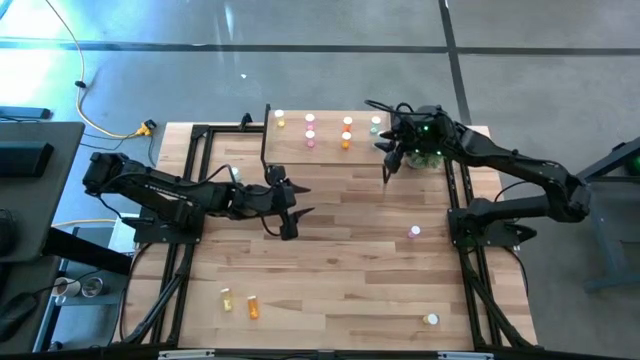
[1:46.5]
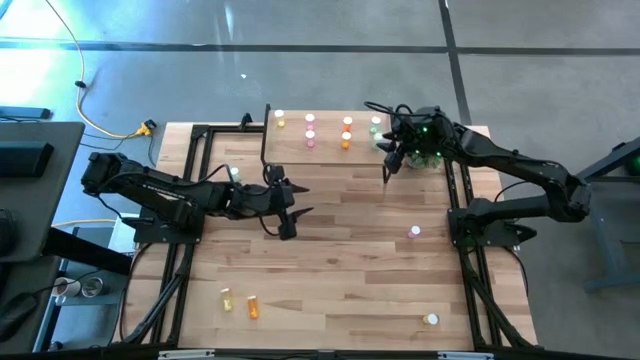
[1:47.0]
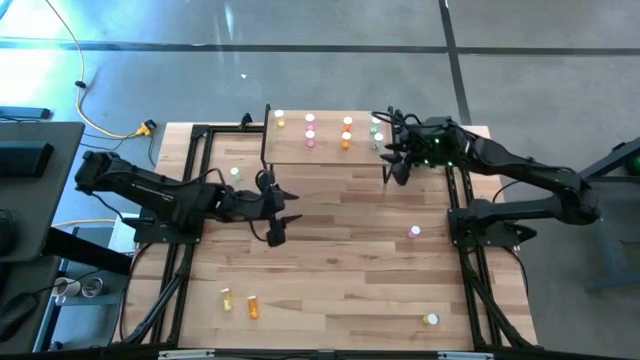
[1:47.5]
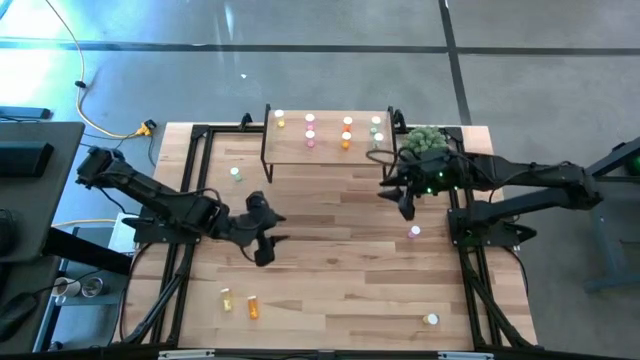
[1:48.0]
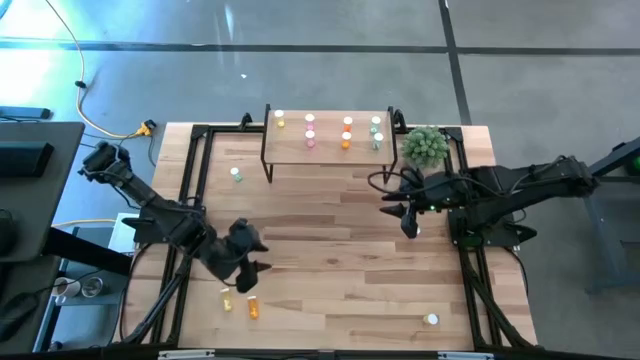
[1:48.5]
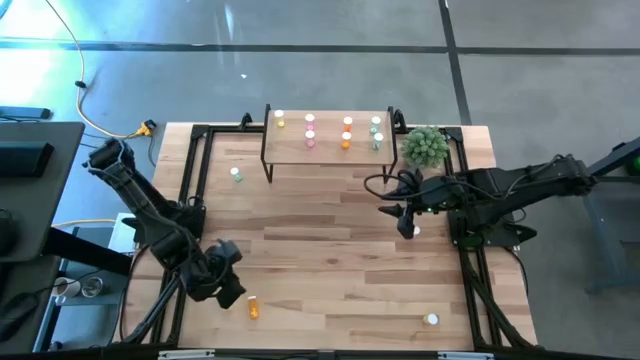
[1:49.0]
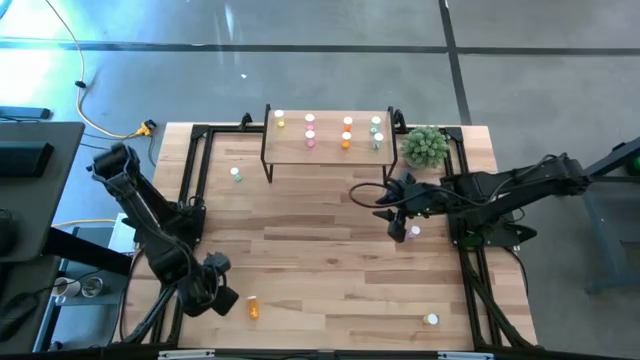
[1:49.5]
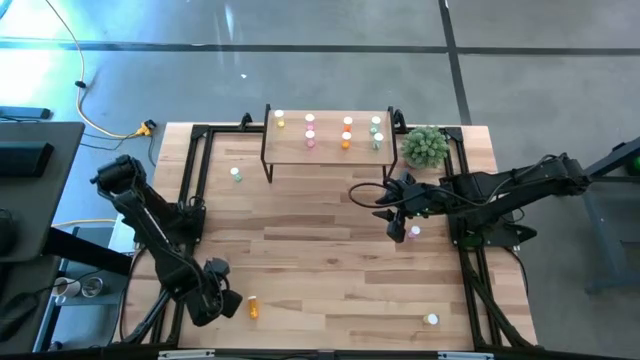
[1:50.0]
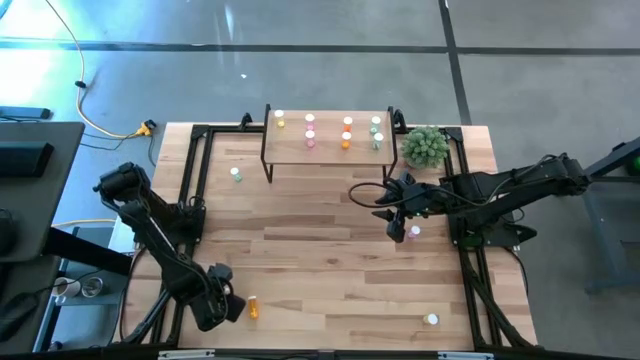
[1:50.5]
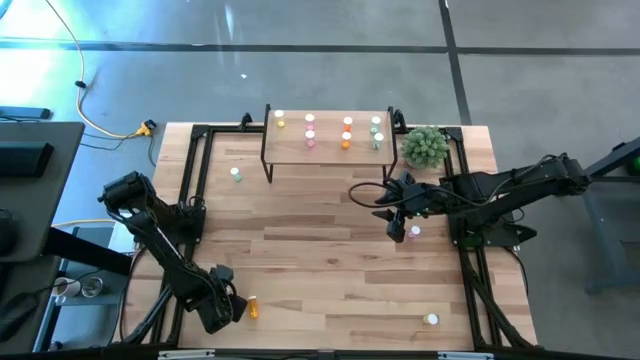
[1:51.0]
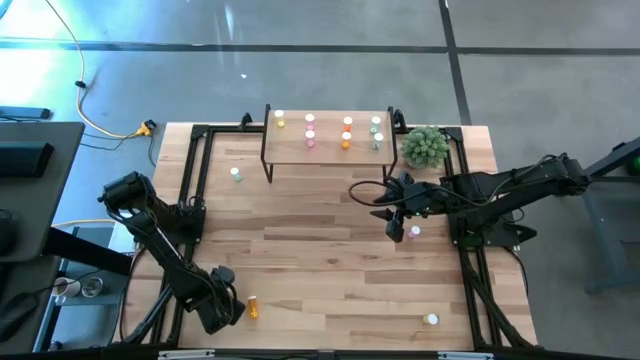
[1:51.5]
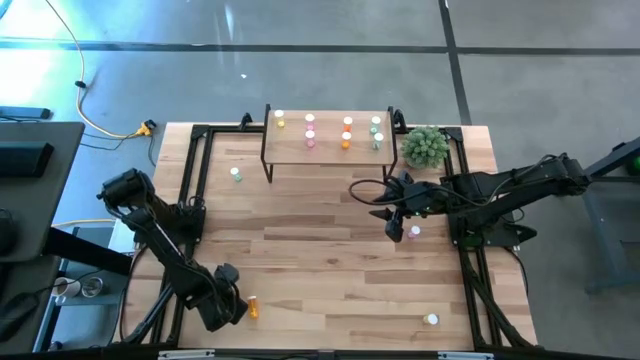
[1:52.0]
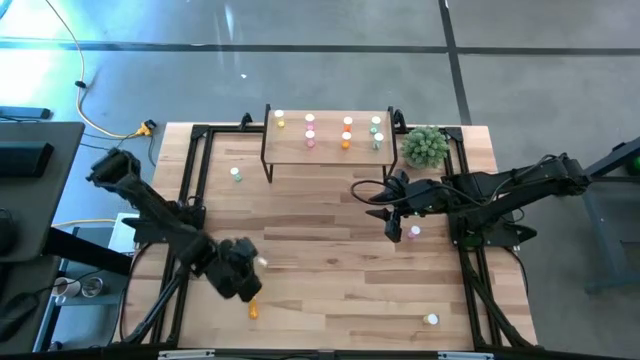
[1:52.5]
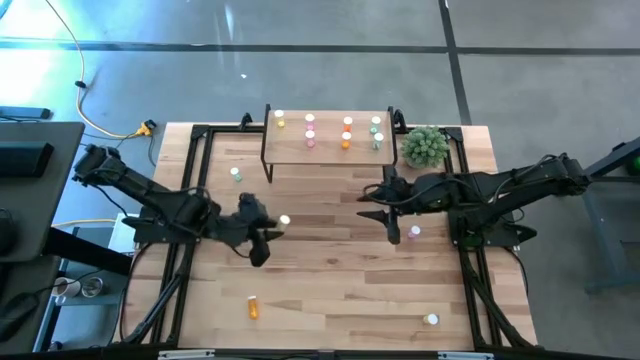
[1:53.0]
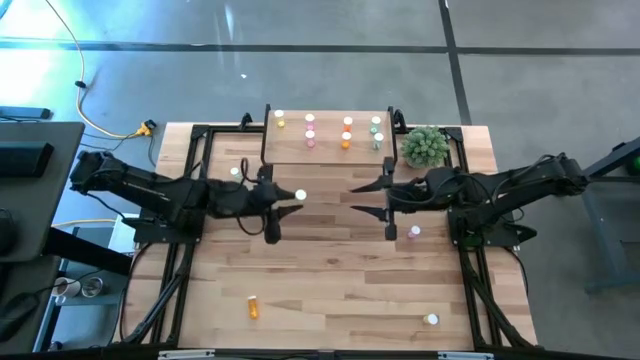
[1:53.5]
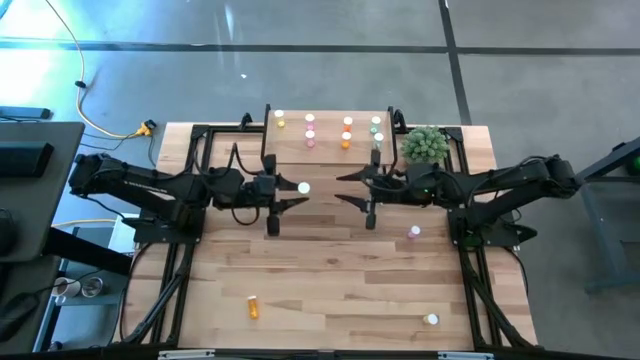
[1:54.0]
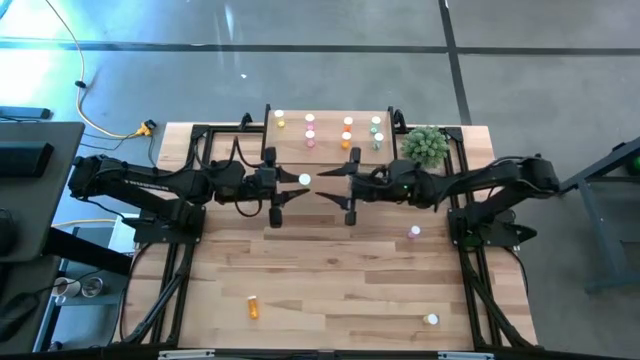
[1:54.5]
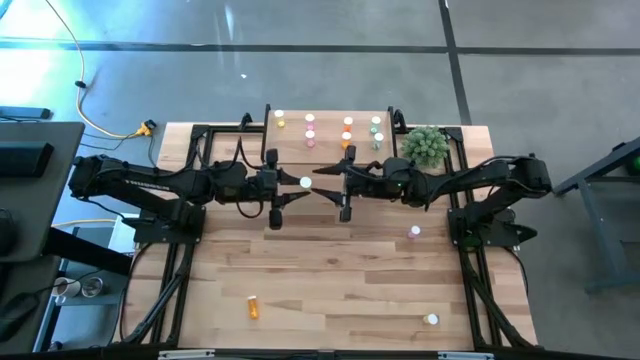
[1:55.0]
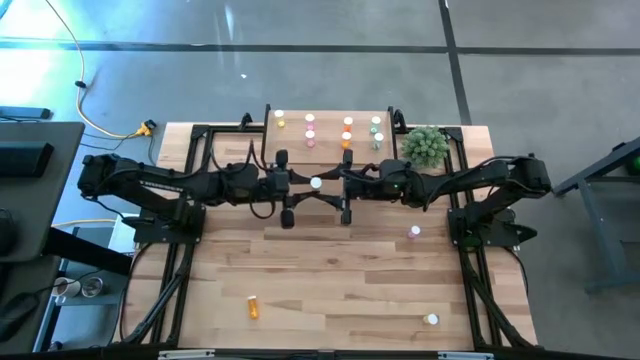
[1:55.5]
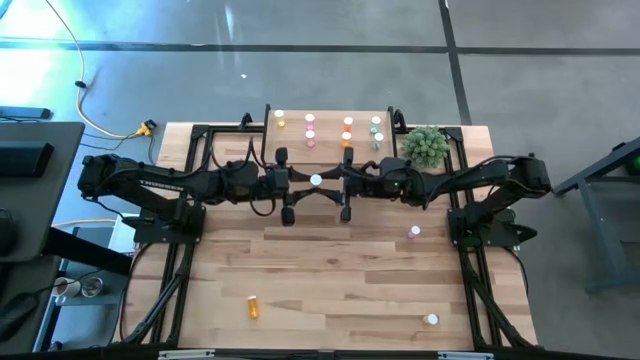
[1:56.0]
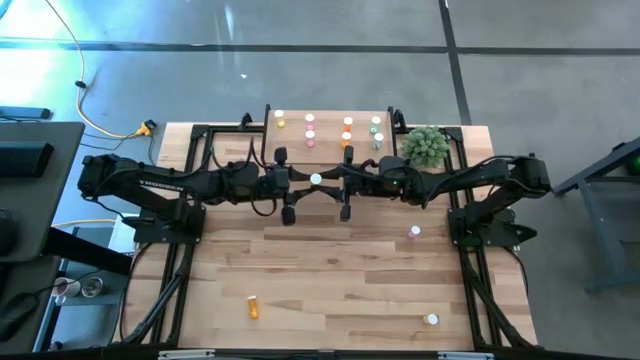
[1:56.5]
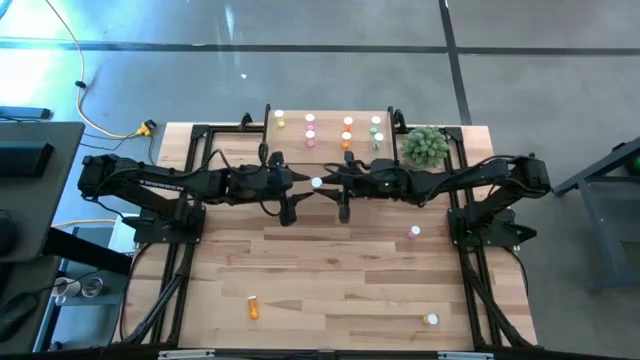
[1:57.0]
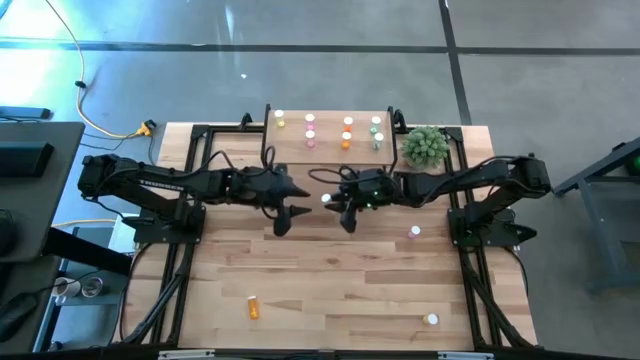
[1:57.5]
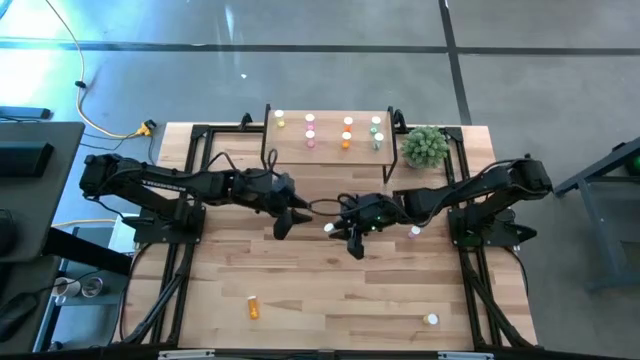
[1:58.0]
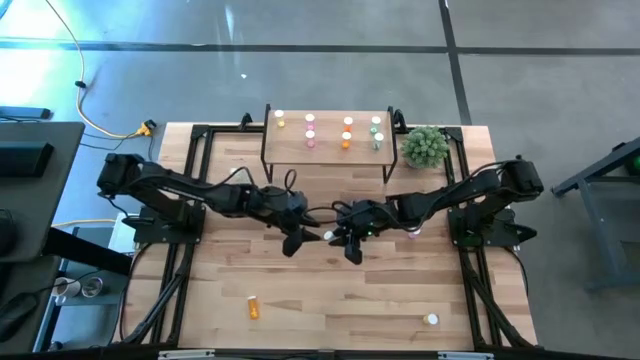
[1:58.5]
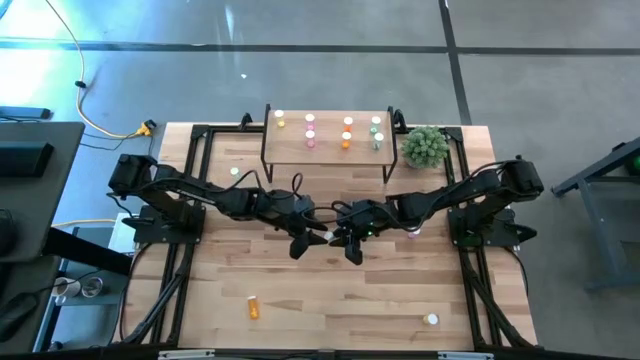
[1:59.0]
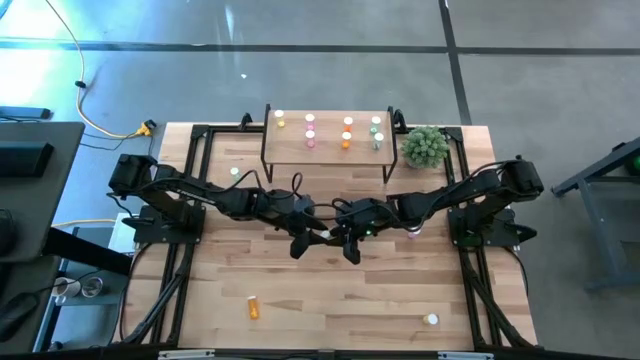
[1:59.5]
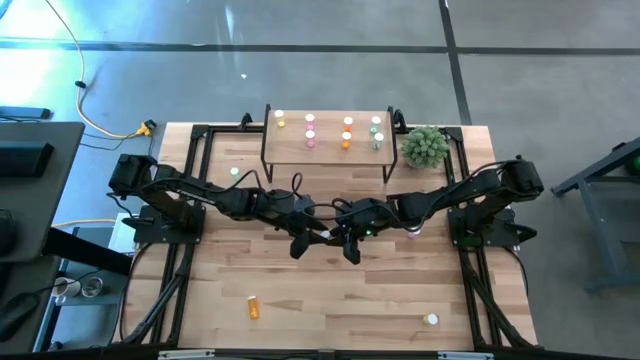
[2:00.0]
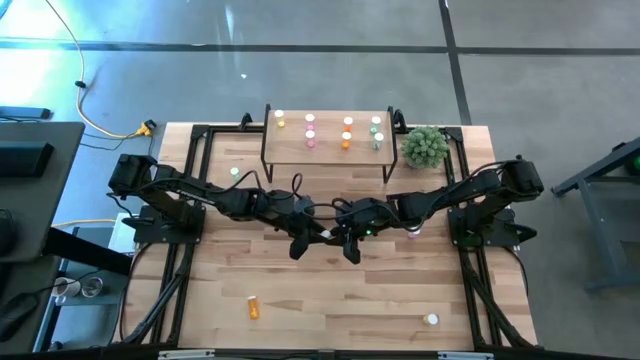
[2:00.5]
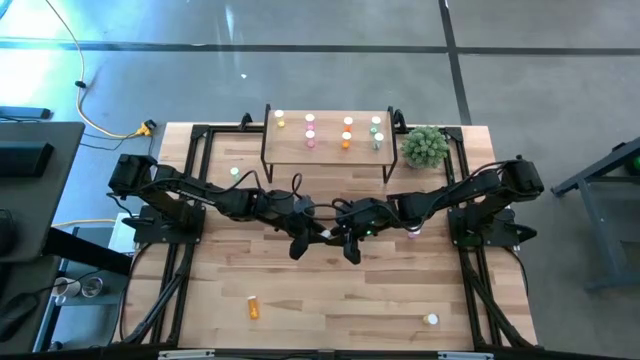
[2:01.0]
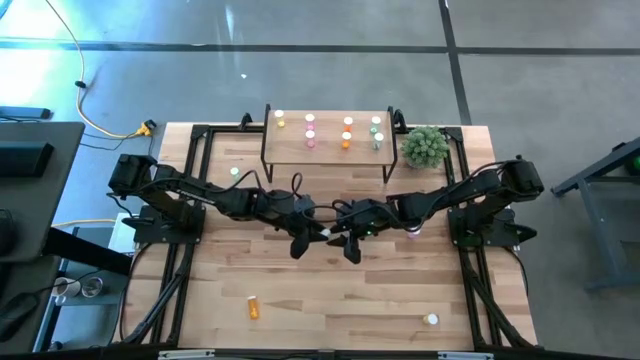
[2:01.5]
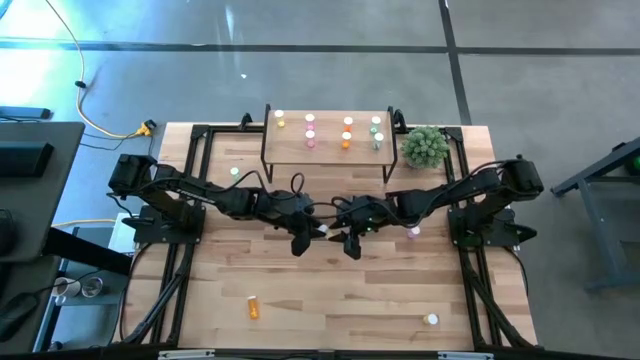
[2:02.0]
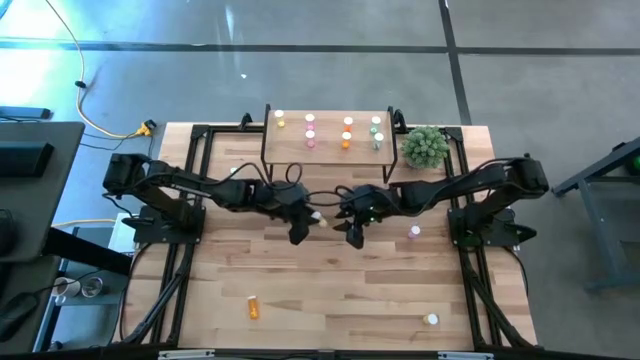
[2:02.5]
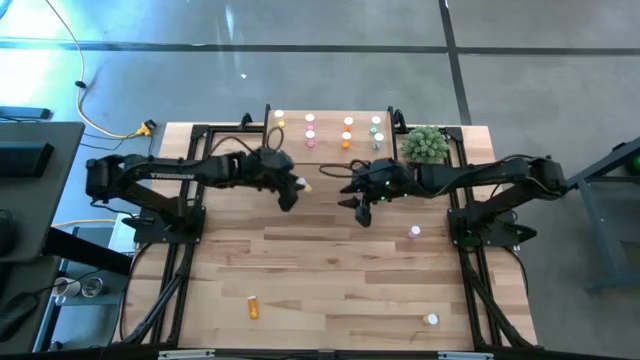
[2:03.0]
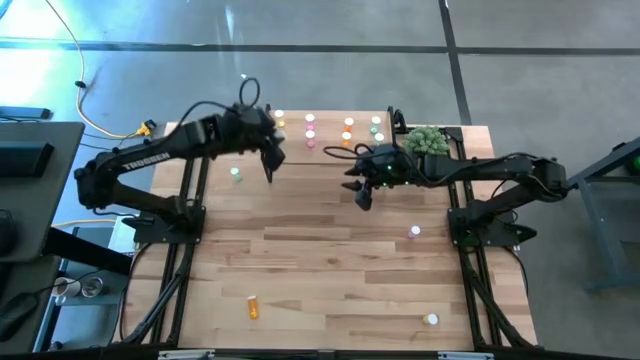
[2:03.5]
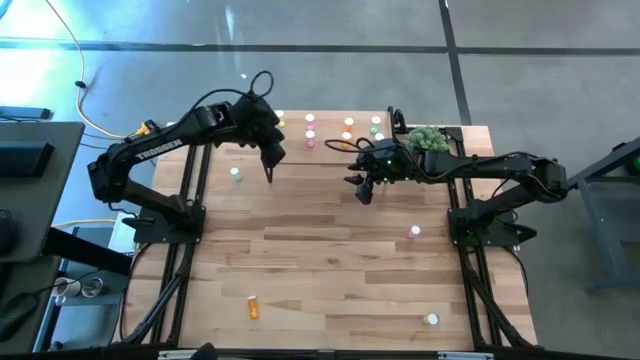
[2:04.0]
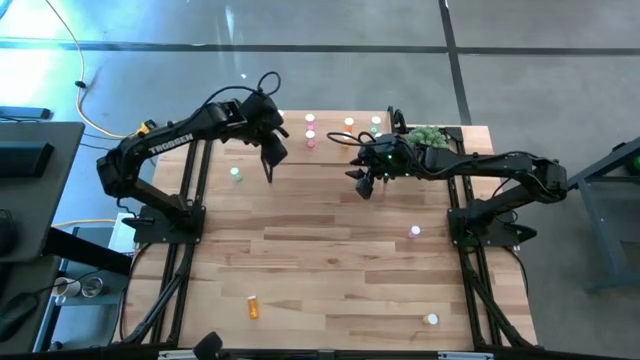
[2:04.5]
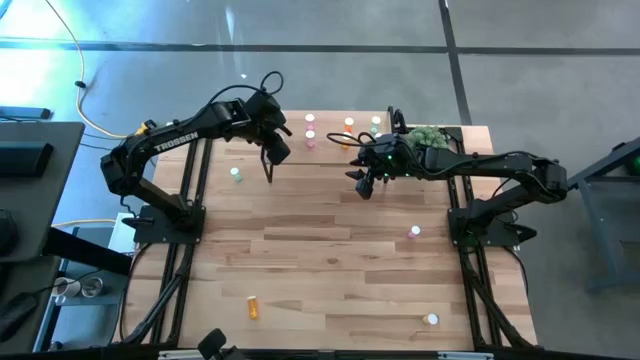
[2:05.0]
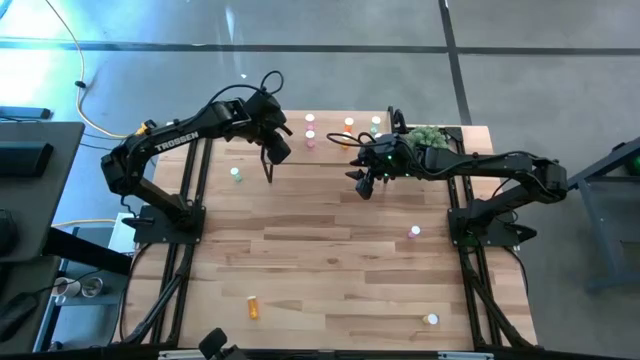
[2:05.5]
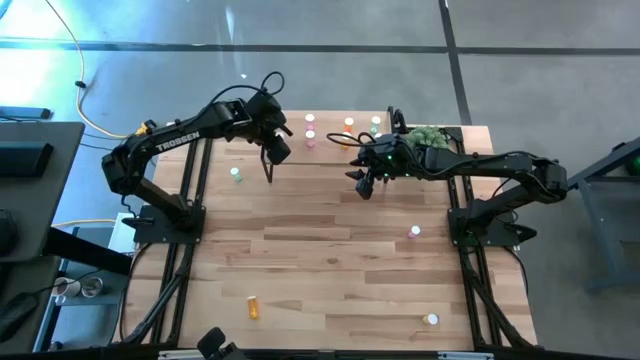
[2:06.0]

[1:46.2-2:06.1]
Task: Pick and place medicine bottles onto shelf by color
Put the left yellow pill bottle on the shelf aligned with the other yellow pill bottle

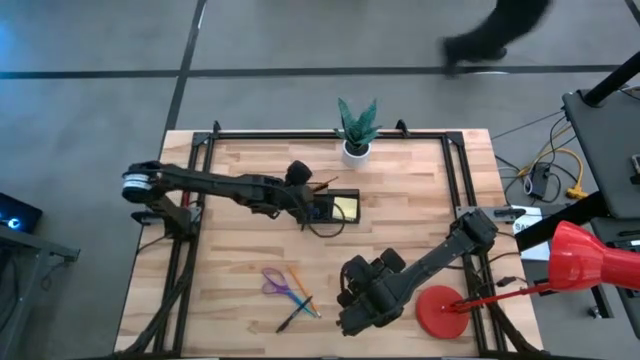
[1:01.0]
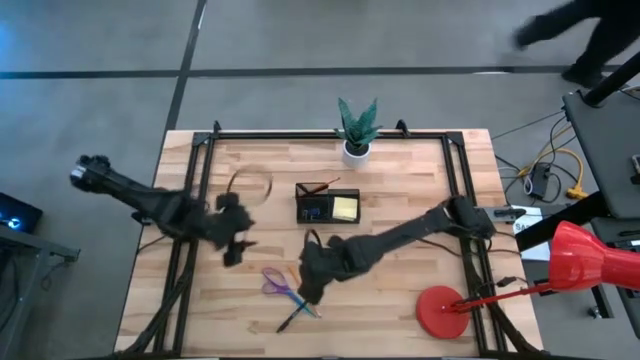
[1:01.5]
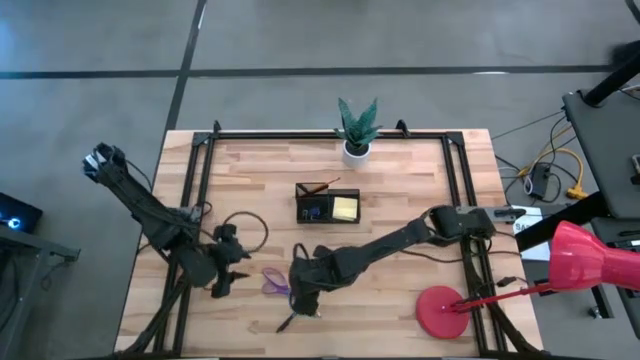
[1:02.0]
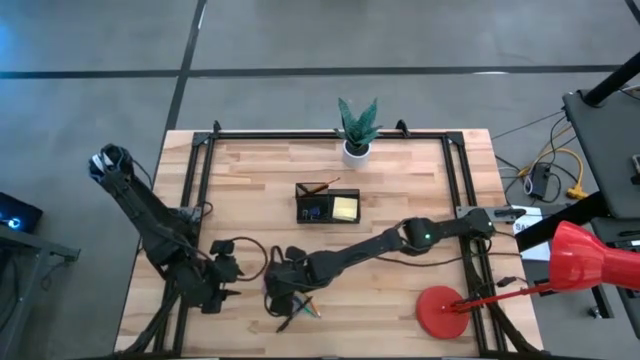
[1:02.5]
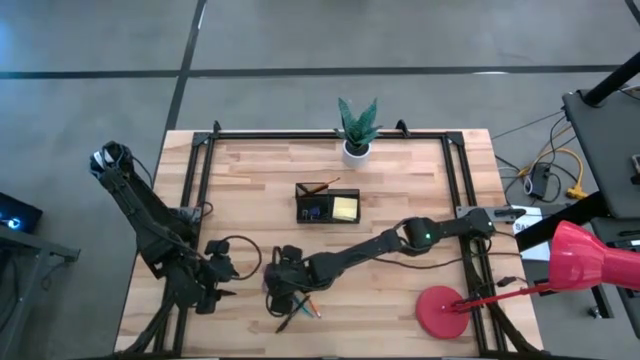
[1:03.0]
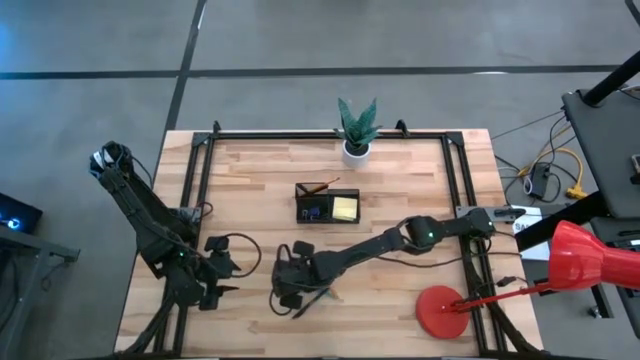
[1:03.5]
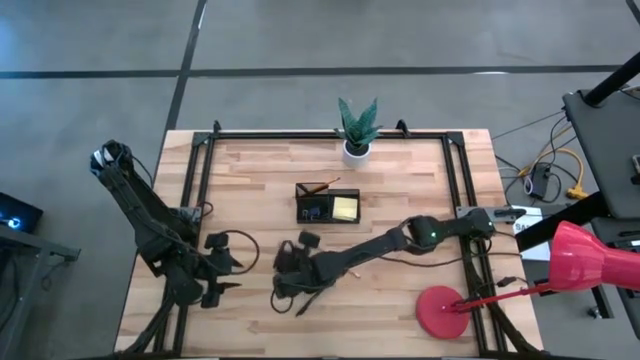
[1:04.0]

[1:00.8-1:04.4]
Task: Pick and place office supplies into organizer
Put the scissors into the desk organizer
